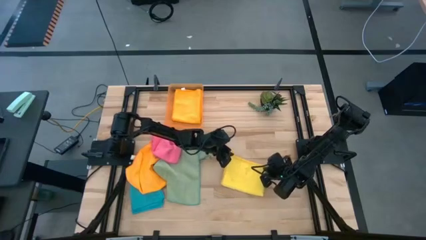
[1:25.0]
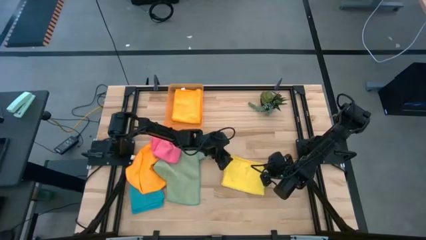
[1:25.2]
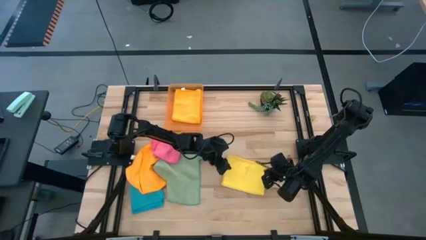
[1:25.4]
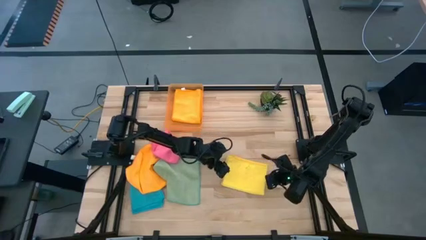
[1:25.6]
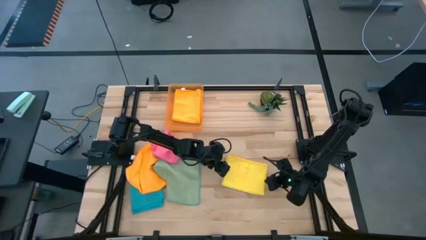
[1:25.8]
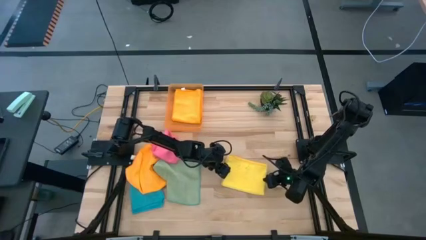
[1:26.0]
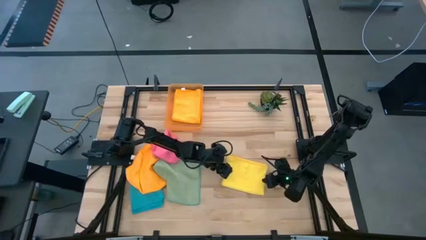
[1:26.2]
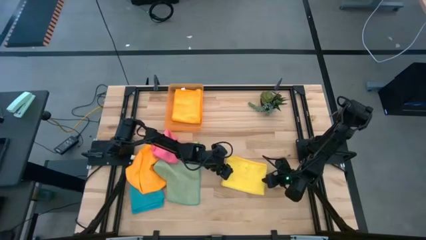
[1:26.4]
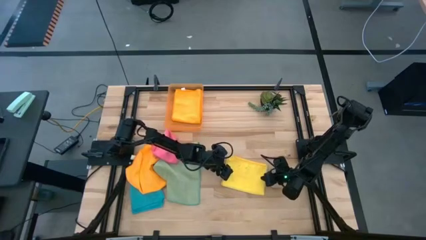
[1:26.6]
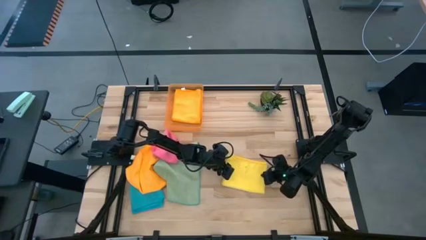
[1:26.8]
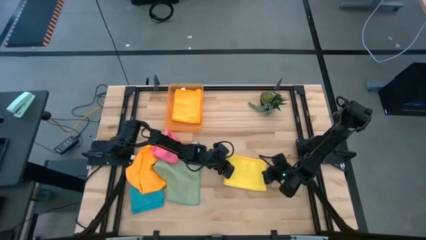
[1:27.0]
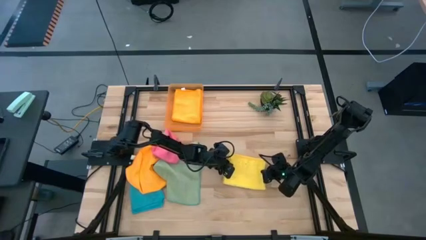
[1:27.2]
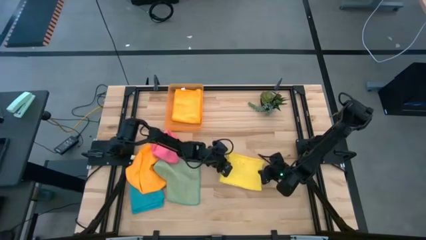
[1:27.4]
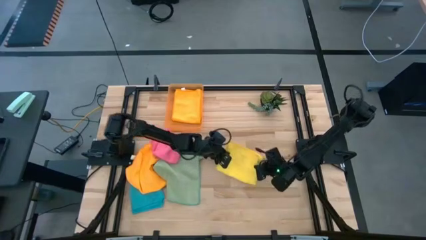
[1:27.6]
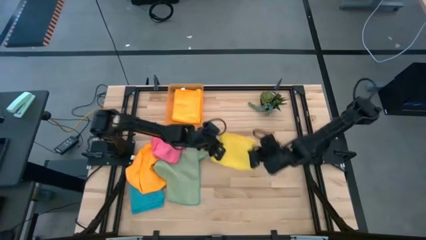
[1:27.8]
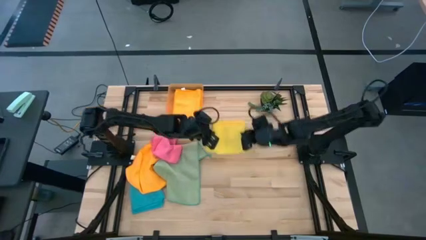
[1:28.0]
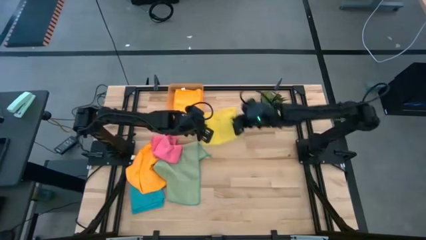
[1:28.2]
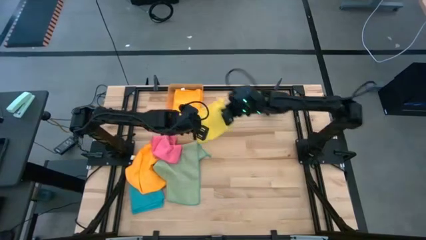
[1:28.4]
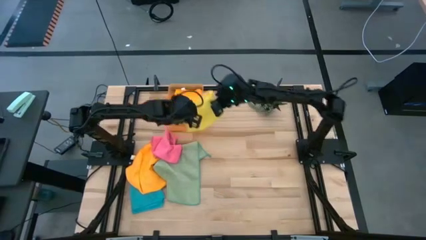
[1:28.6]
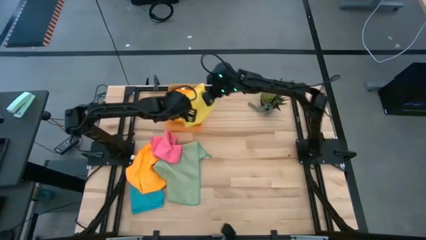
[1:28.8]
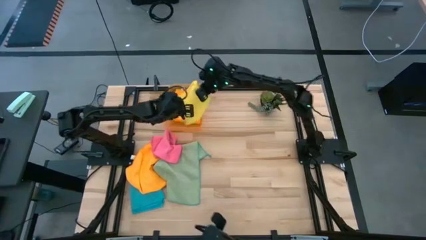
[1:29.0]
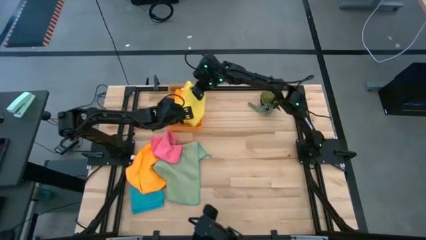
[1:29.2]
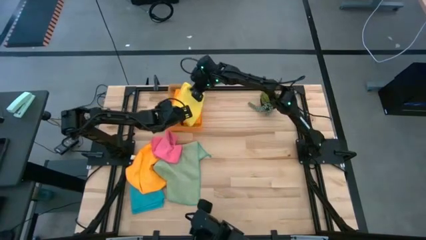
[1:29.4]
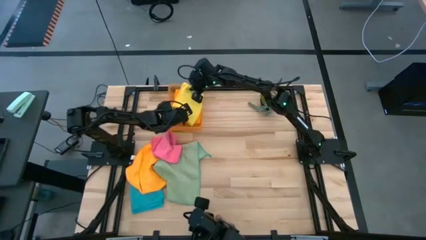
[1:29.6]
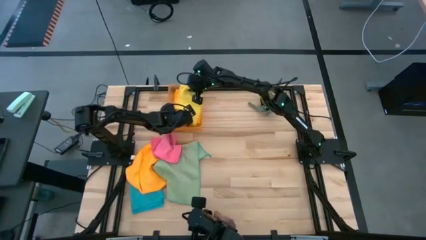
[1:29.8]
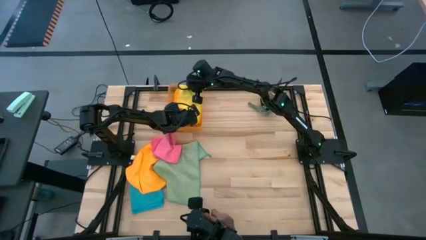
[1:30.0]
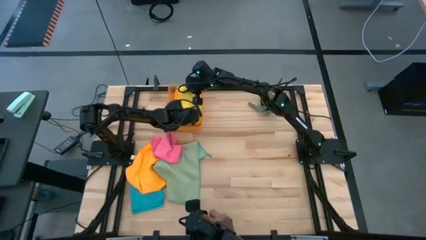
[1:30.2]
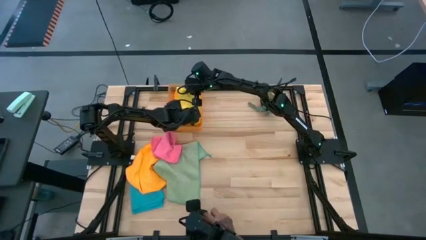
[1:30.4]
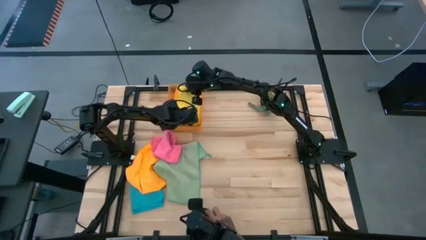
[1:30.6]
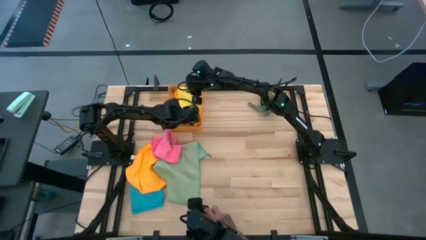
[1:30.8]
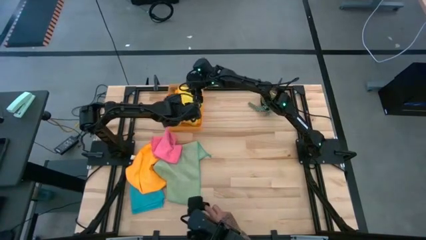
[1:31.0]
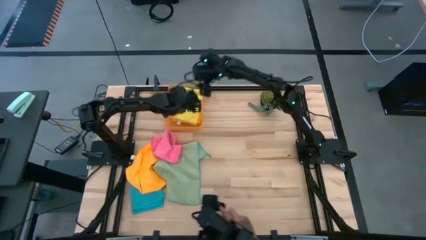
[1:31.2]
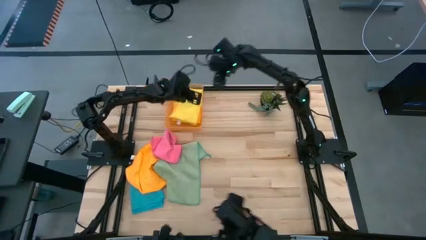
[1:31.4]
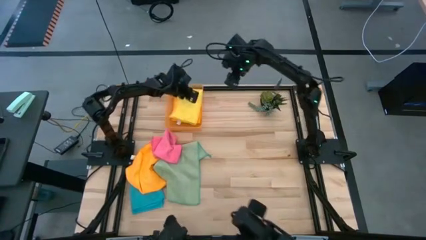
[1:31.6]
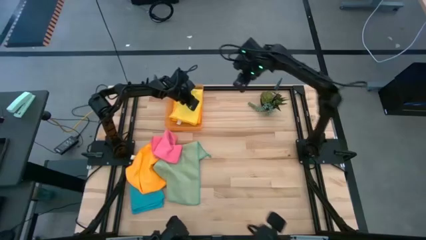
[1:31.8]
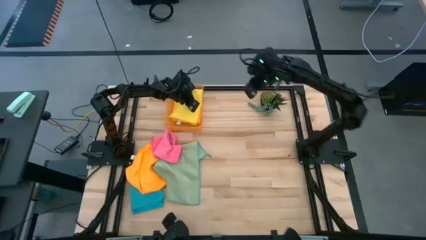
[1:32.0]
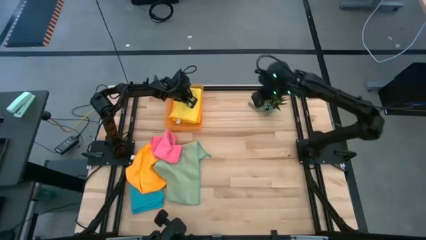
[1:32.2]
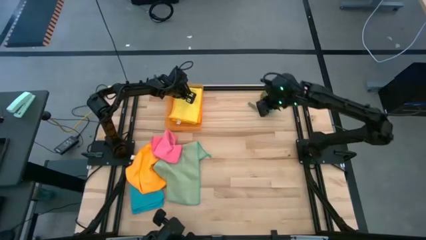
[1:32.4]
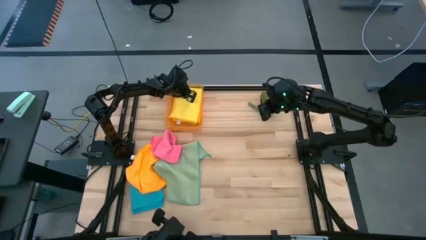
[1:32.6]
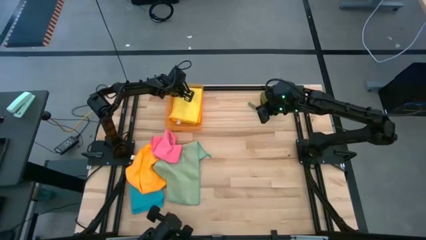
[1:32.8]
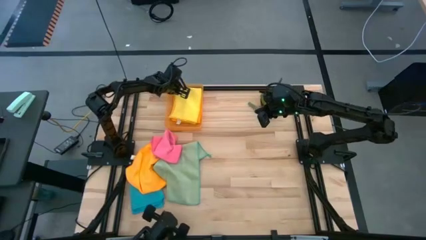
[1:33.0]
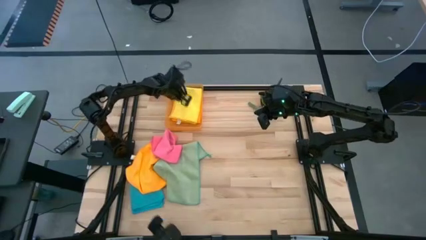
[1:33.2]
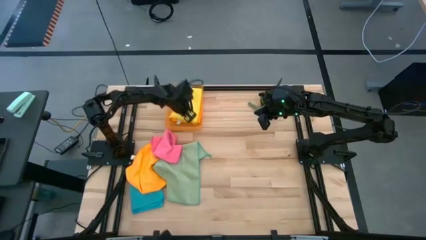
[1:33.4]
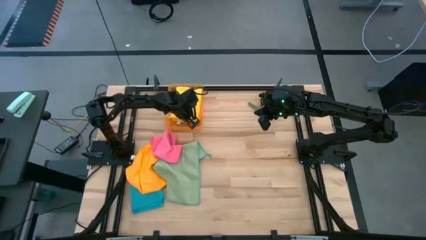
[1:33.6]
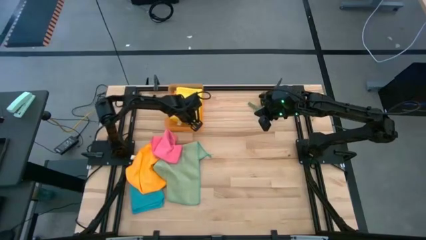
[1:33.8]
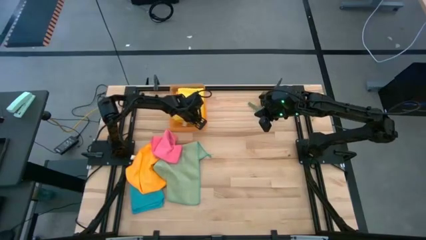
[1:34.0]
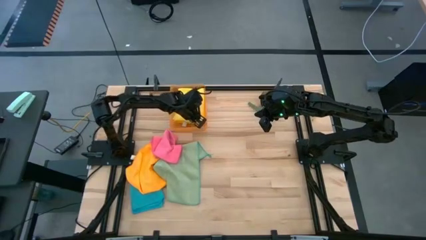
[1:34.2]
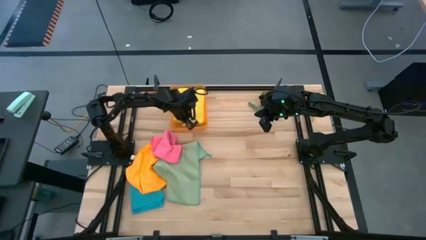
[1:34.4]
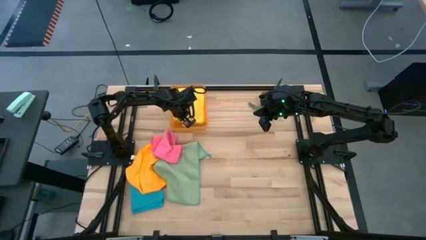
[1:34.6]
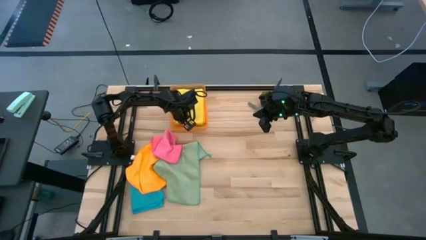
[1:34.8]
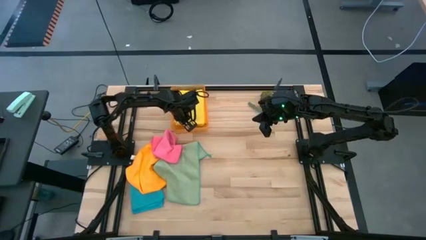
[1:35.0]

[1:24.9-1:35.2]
Task: Fold microfiber towels
Put the yellow microfiber cloth into the orange bin

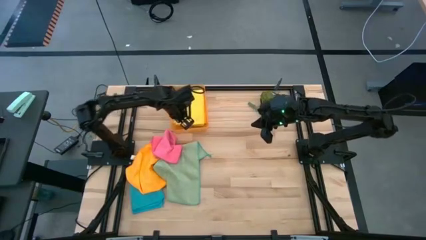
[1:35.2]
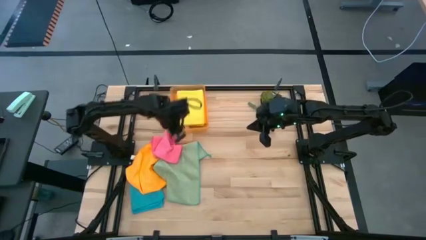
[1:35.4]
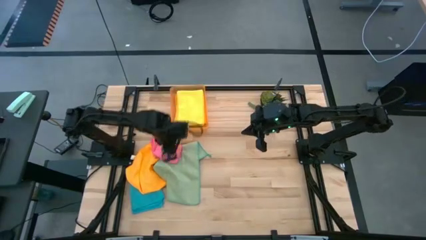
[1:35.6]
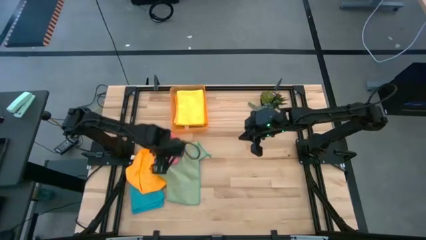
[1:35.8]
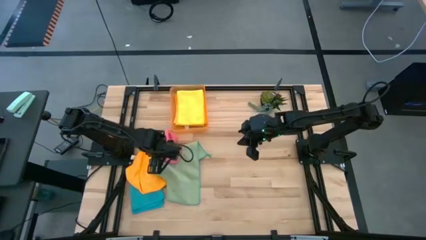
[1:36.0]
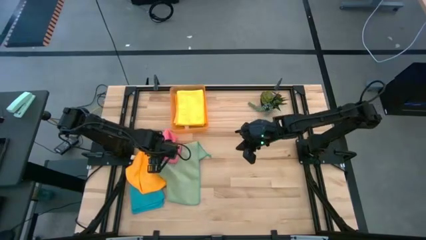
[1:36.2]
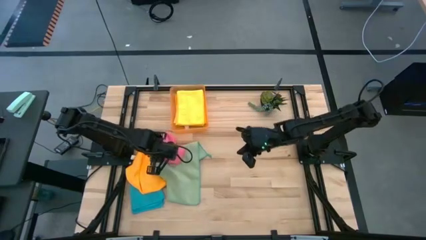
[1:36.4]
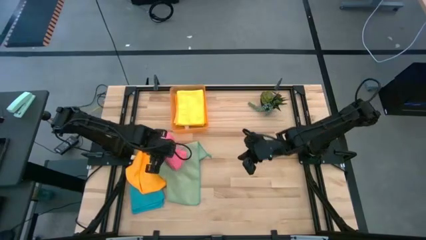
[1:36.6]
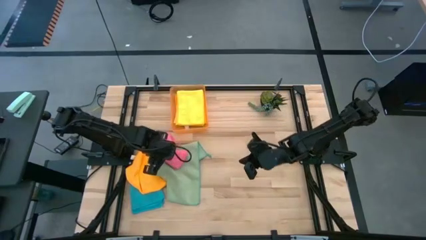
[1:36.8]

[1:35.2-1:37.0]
Fold the pink microfiber cloth
